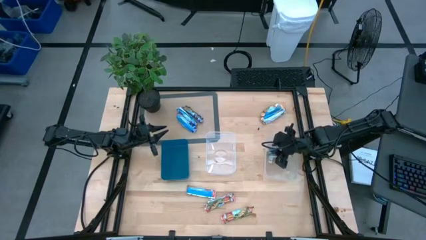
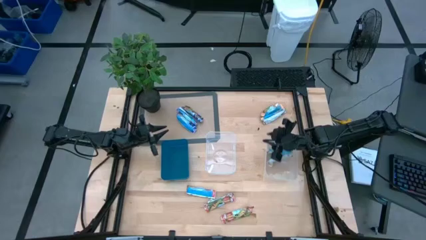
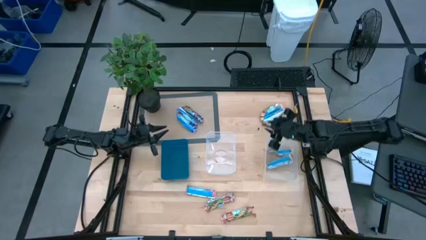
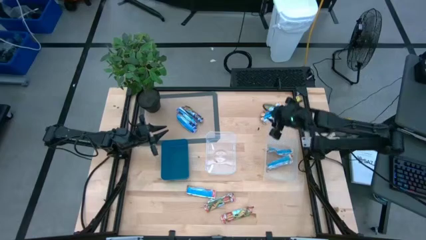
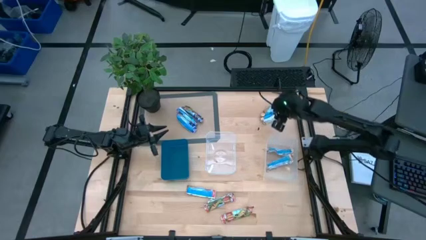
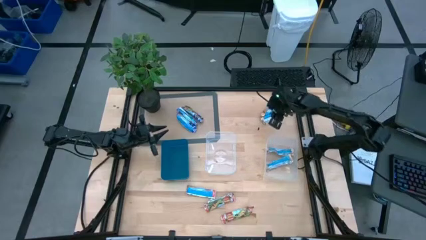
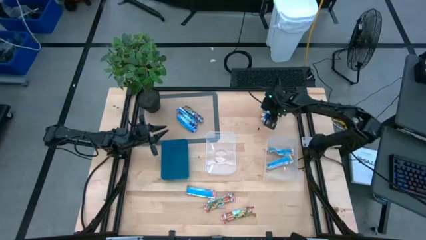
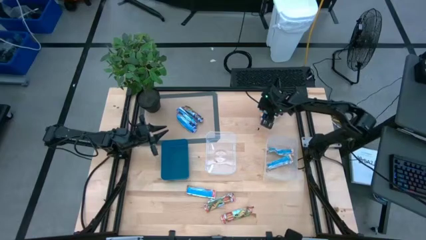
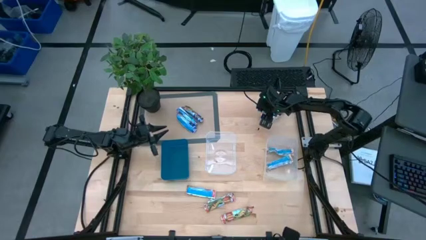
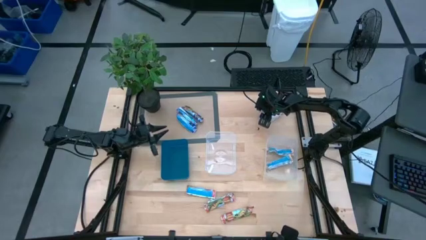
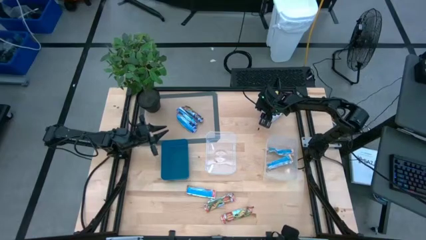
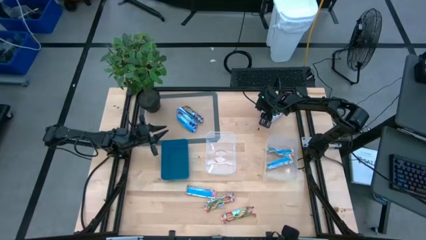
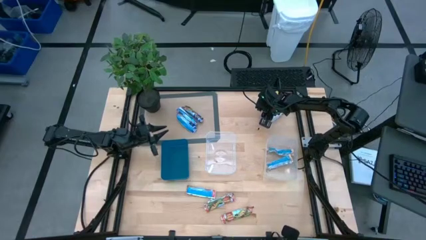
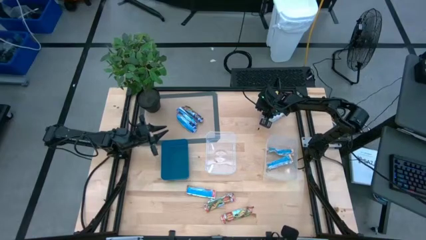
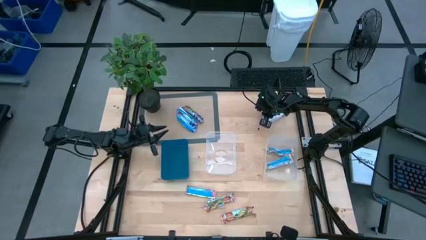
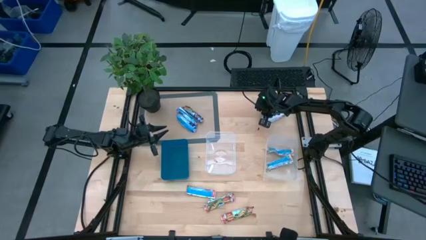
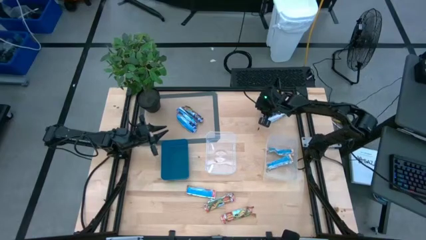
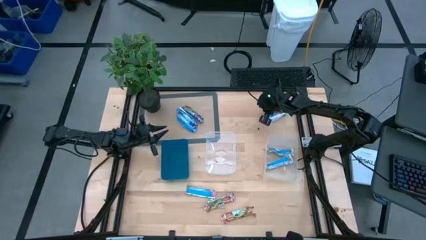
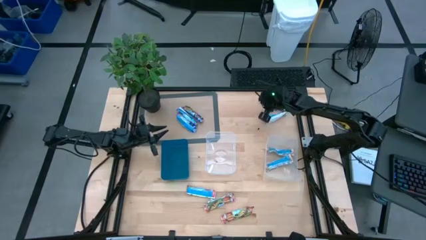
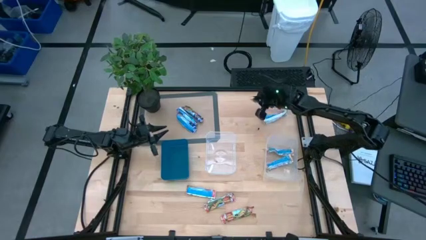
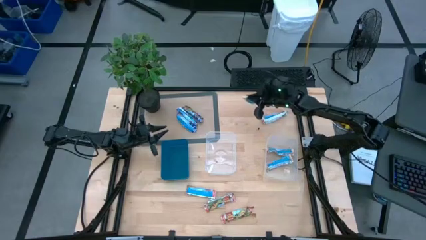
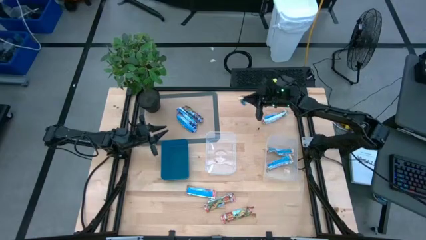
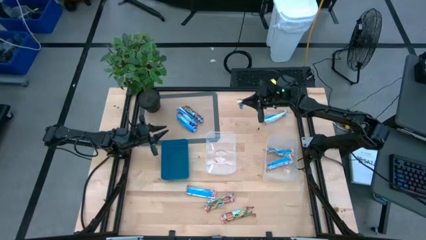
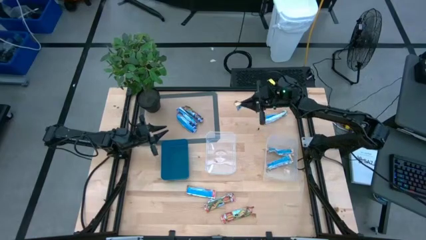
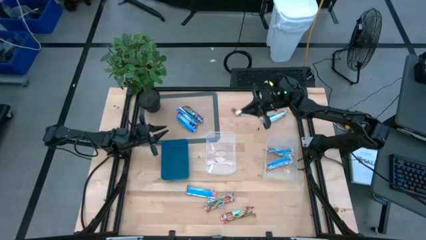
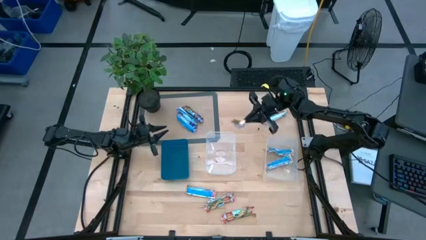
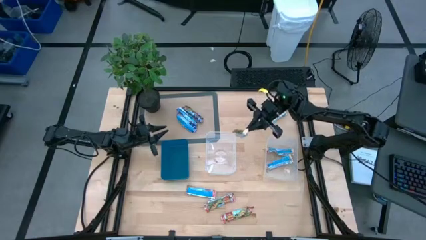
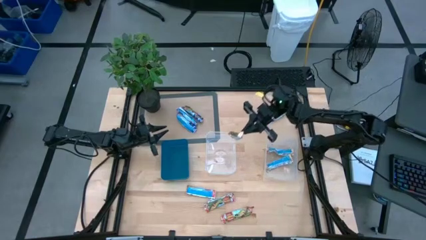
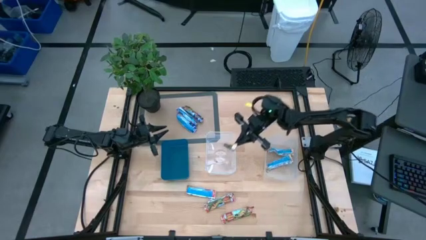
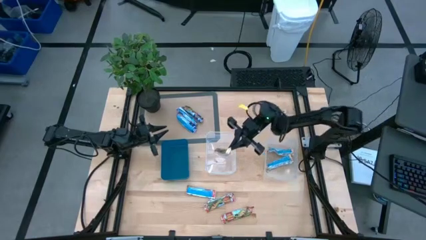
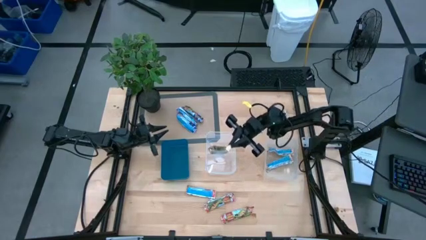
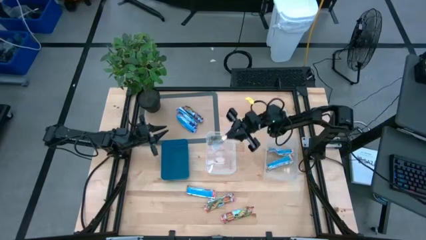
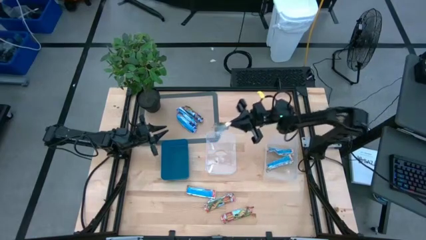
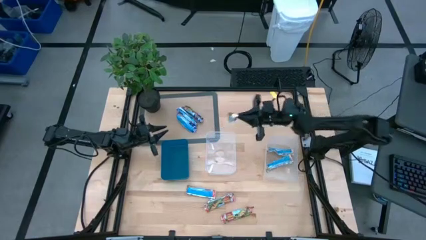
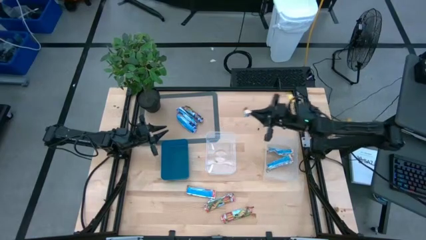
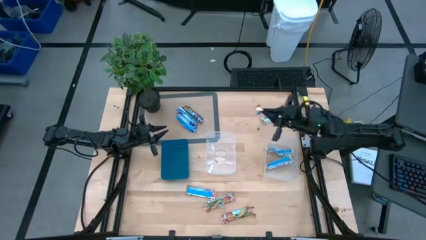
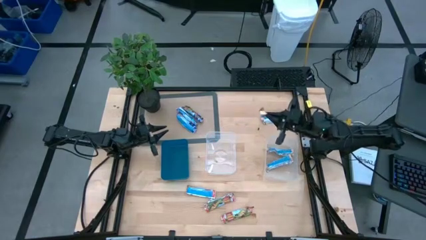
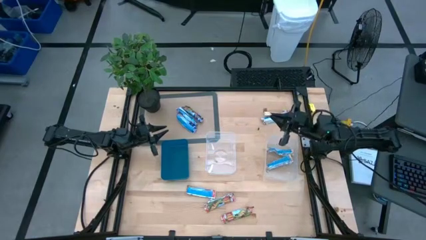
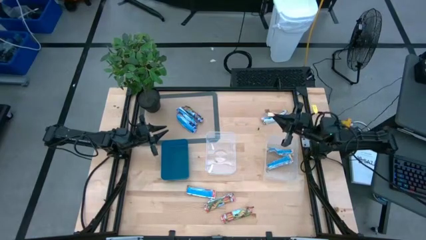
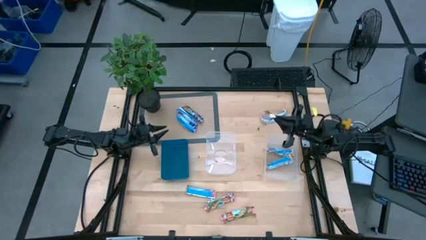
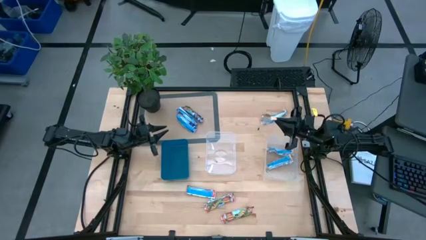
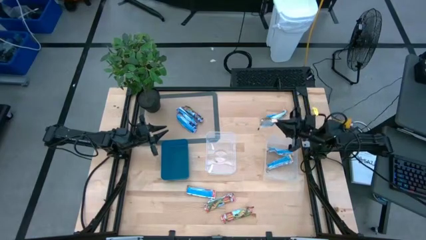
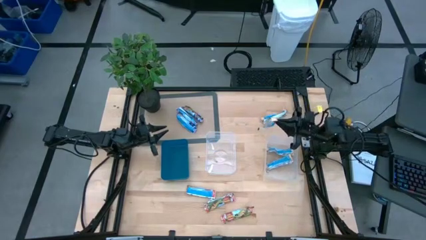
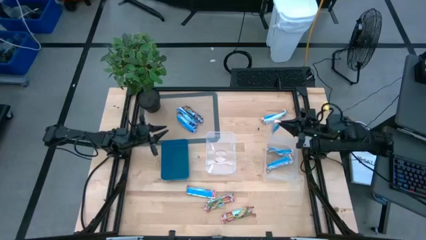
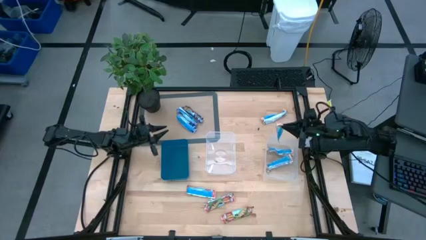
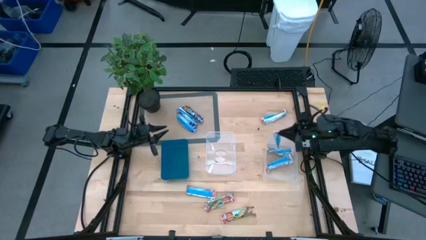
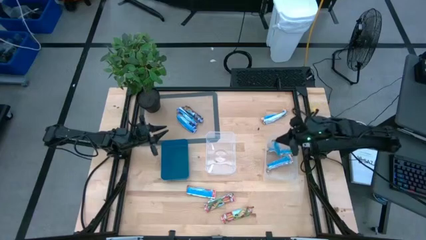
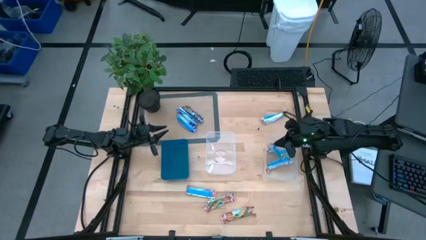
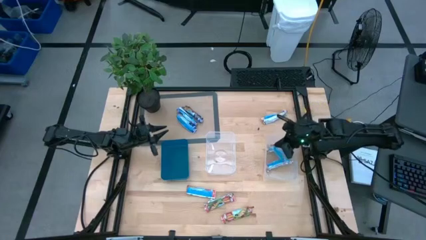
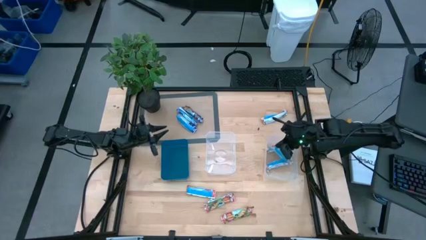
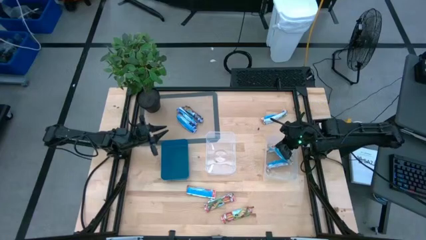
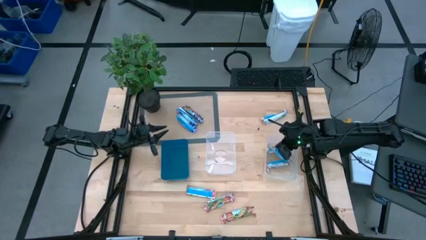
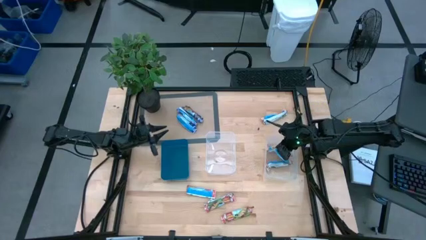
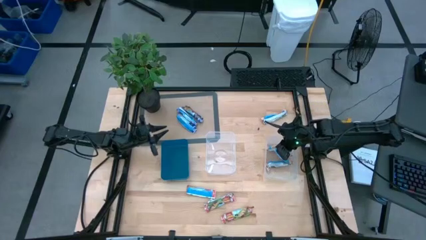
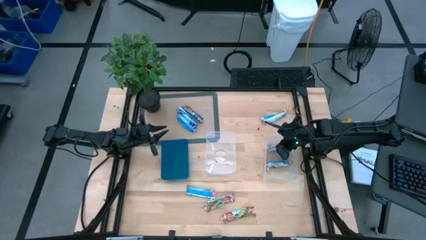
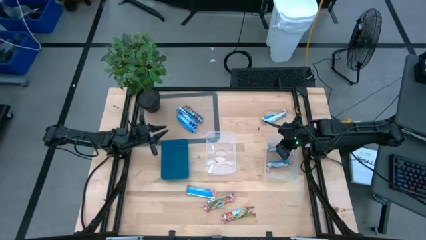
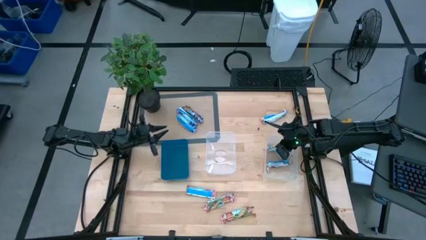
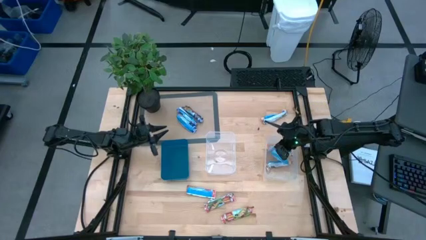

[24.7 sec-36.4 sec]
Task: Pick and place Granola Bars by type
Put the yellow granola bar into the right transparent bin

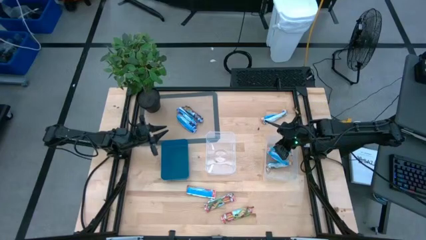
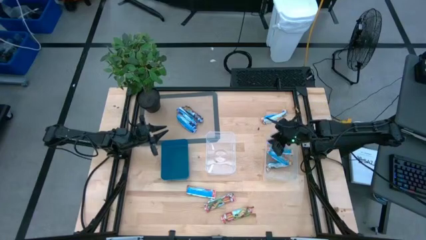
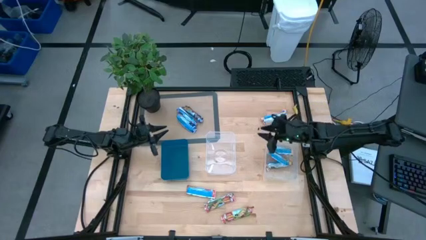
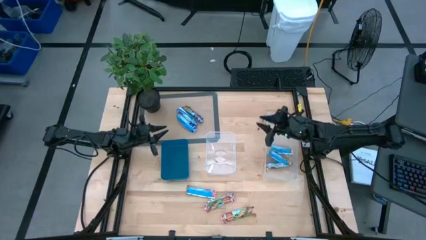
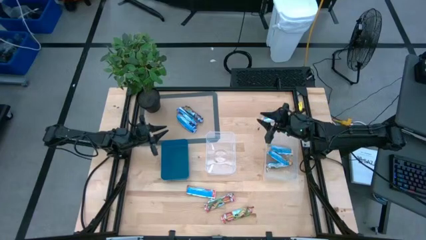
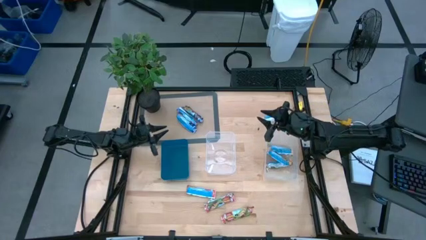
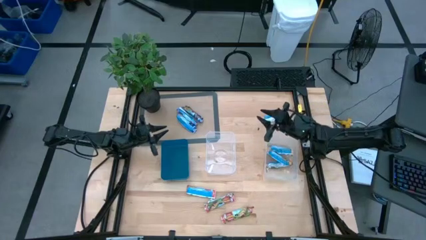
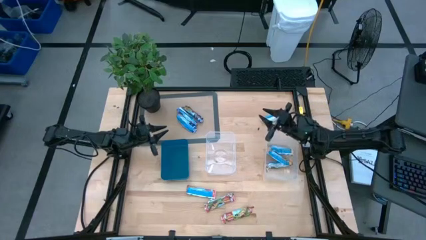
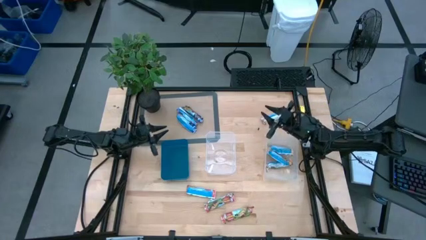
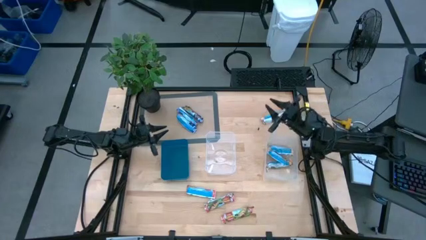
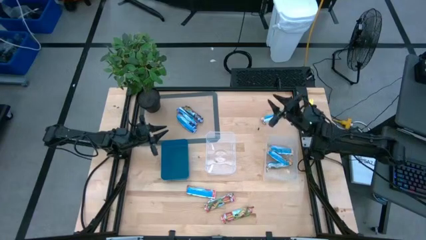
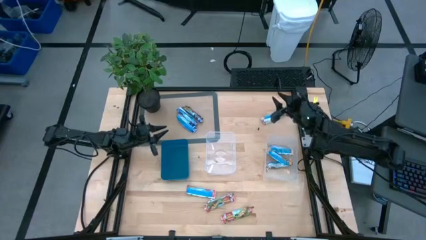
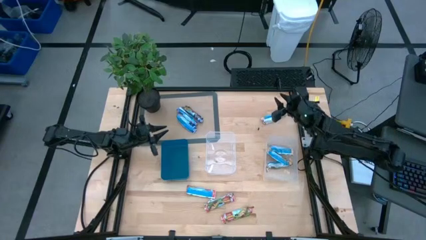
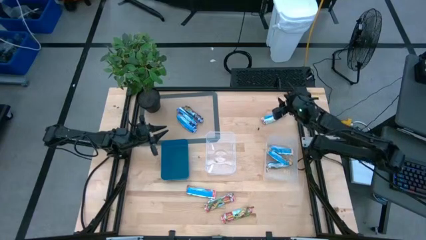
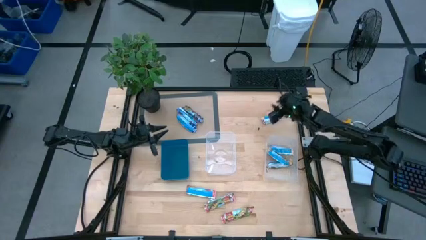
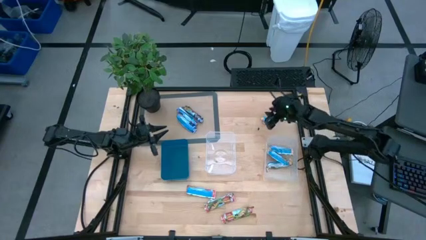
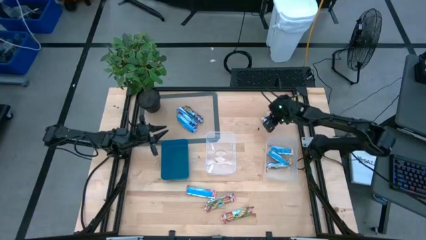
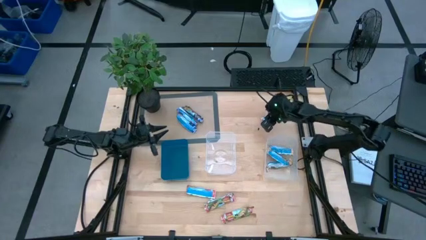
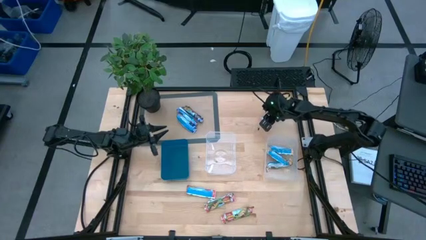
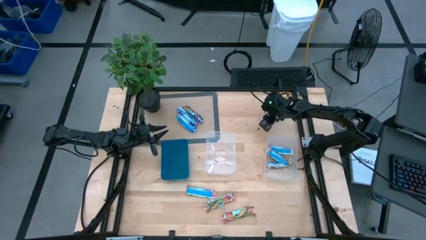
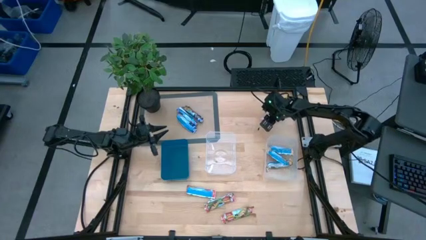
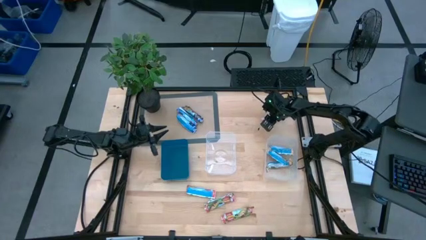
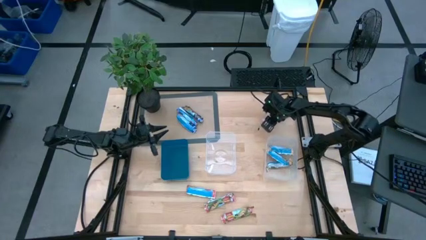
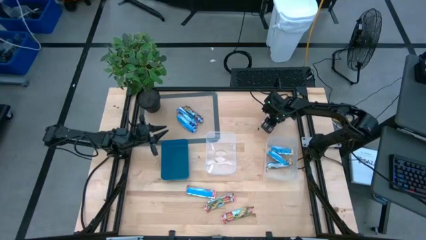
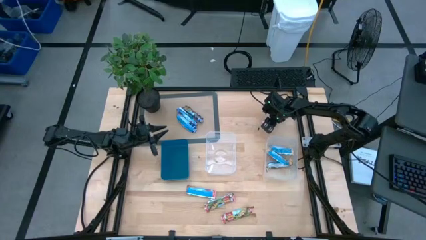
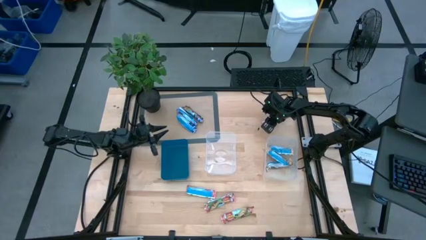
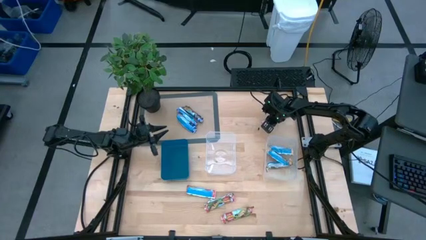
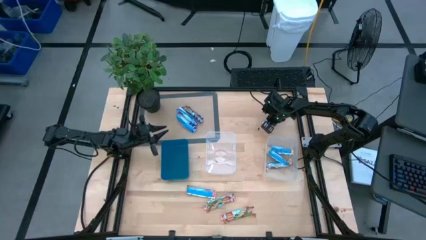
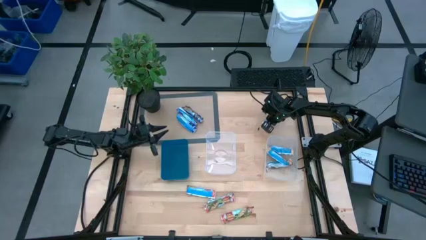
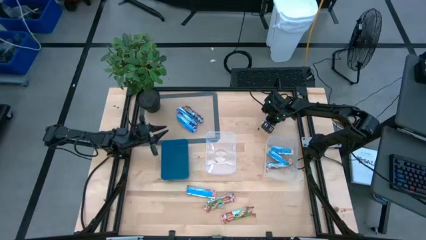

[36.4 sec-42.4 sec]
Put the yellow granola bar into the right transparent bin
